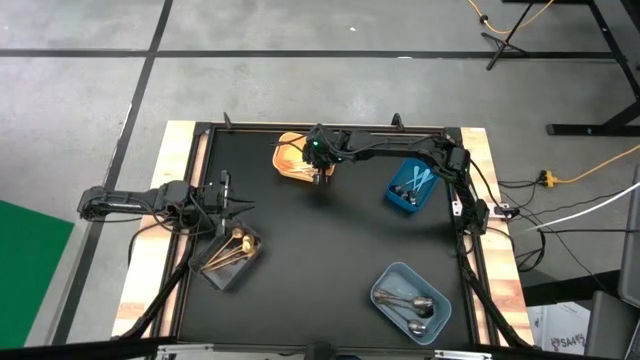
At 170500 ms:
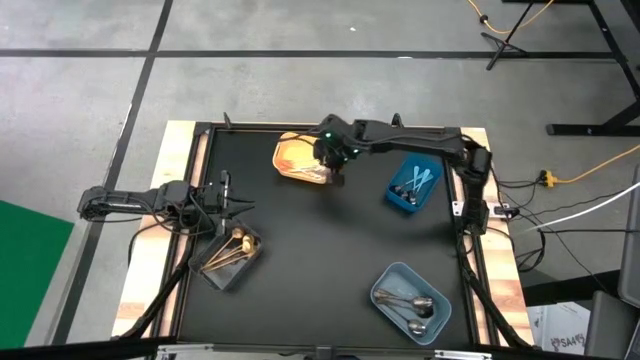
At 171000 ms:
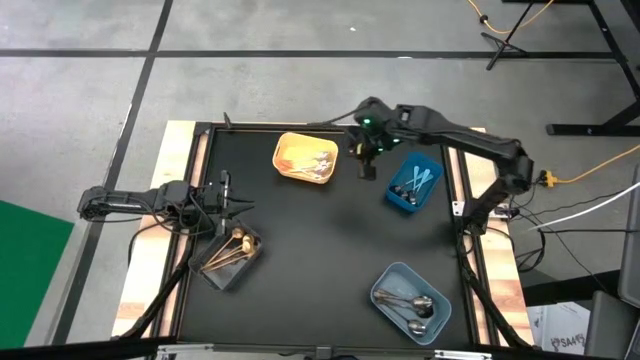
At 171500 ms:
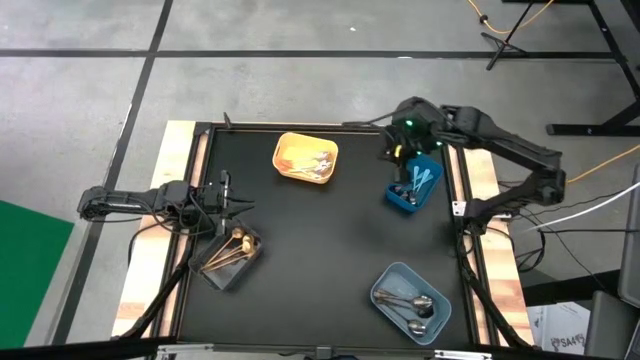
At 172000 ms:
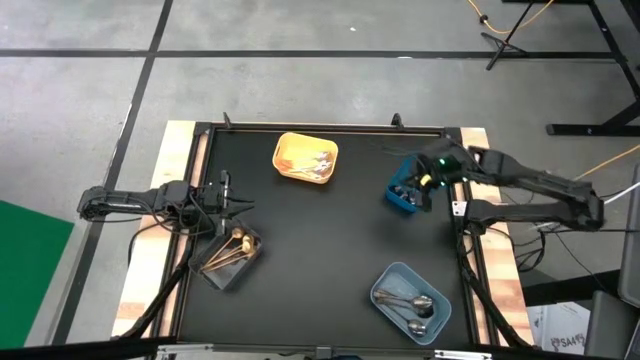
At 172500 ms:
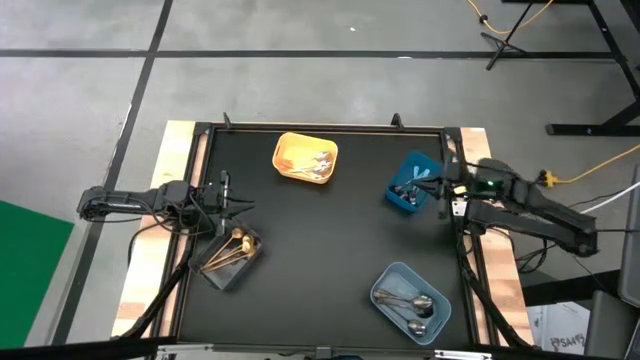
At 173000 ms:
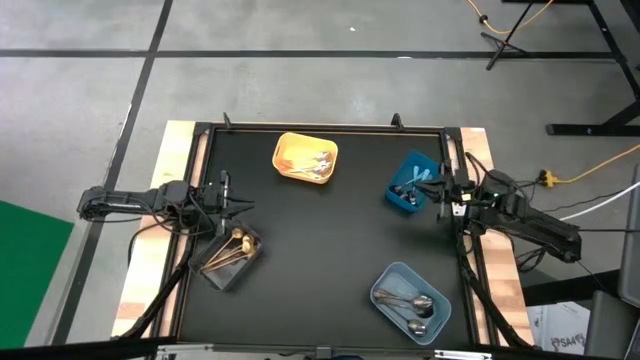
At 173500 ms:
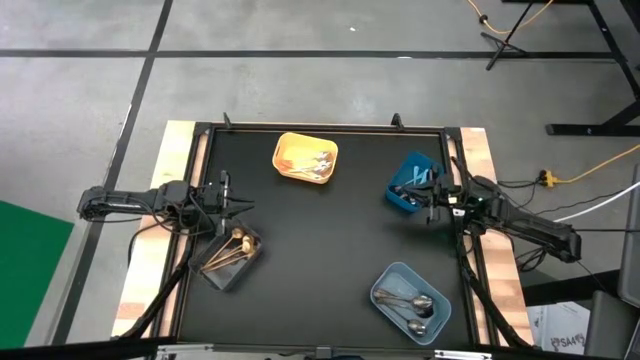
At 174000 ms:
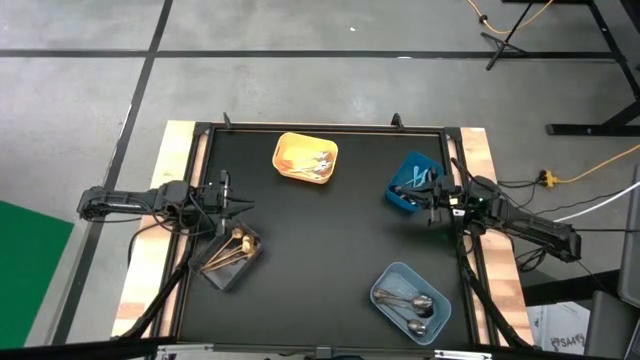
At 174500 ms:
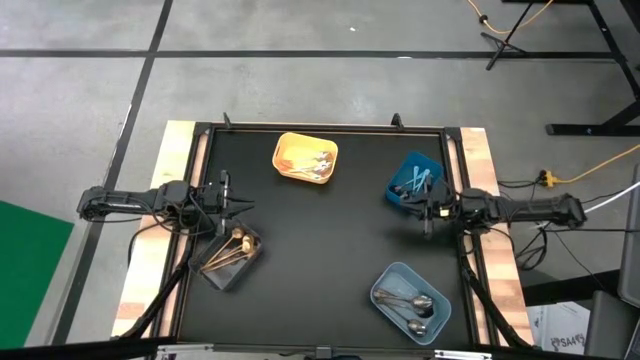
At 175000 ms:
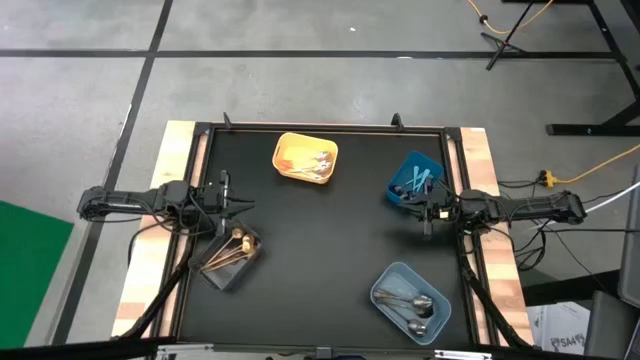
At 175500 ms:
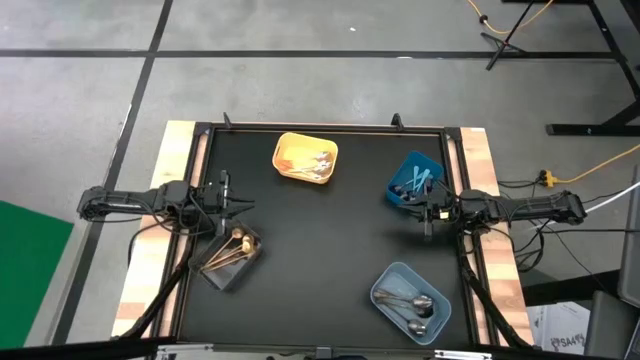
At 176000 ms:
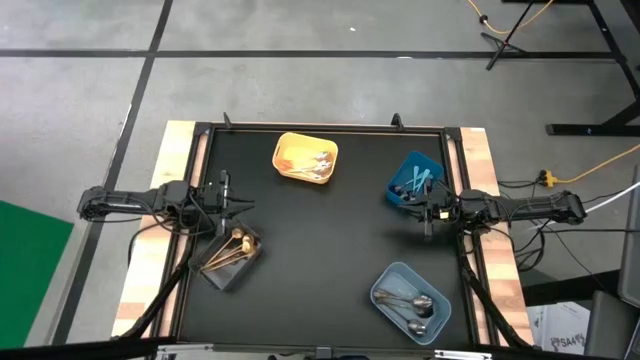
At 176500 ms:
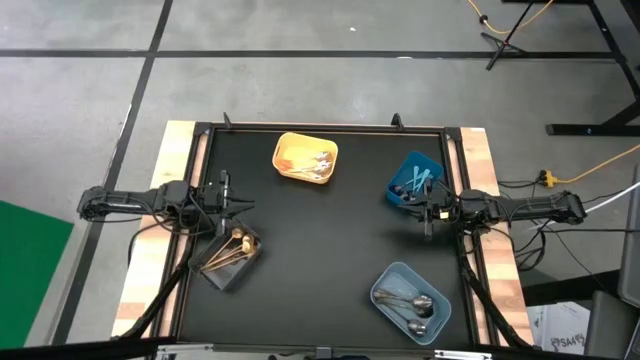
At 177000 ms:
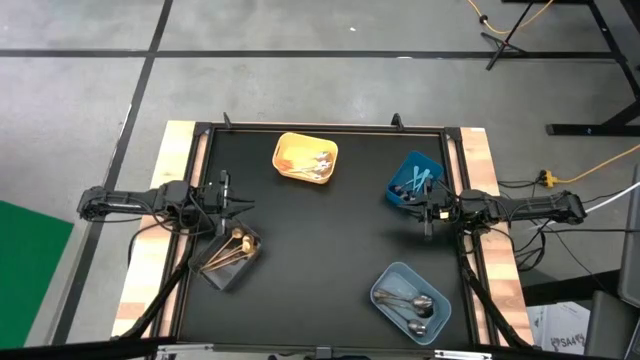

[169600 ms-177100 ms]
Task: Sort silverware by color (type)
Return to Home Position

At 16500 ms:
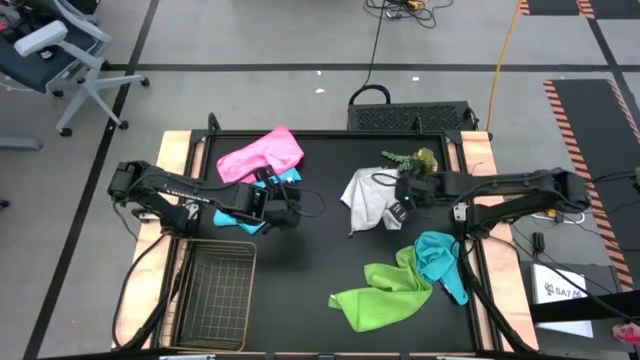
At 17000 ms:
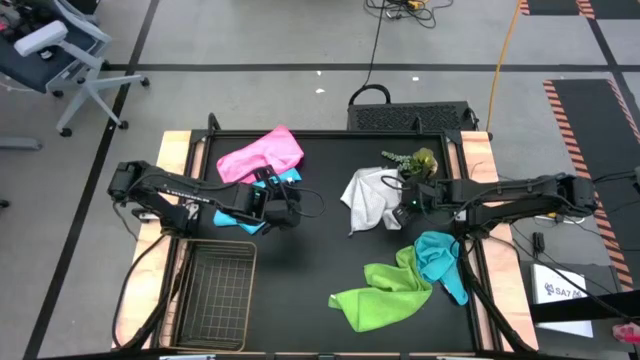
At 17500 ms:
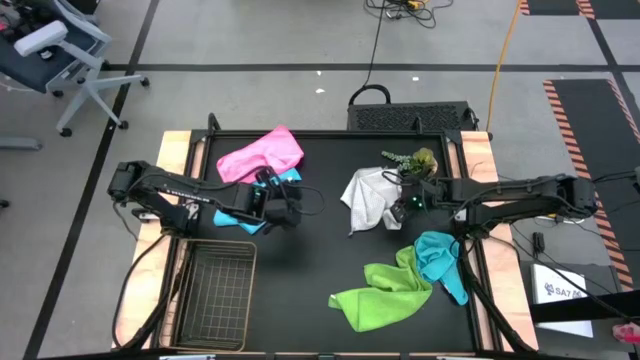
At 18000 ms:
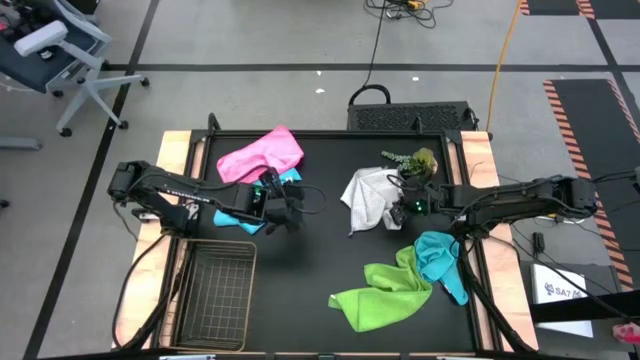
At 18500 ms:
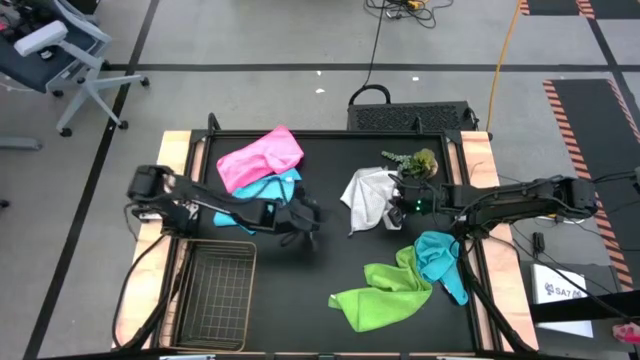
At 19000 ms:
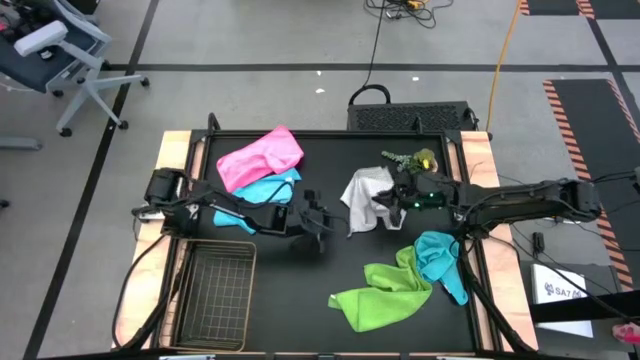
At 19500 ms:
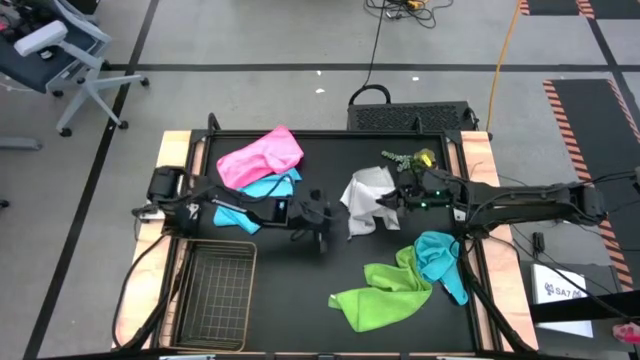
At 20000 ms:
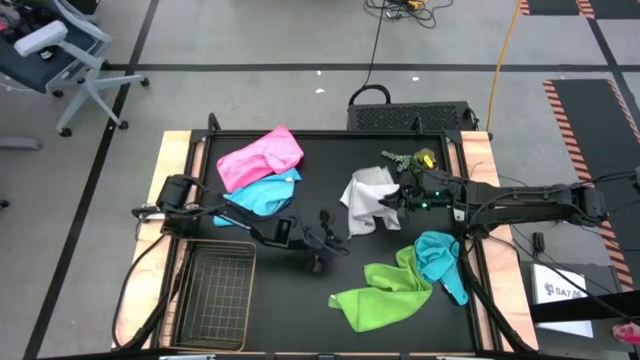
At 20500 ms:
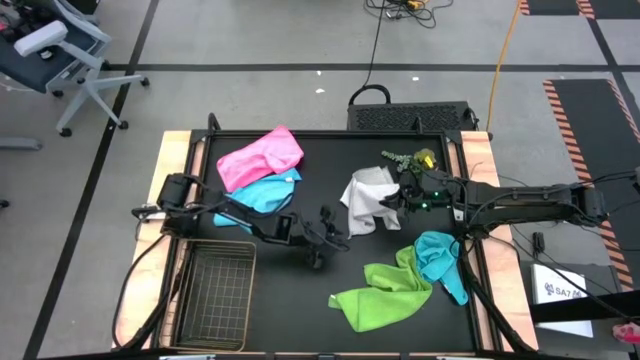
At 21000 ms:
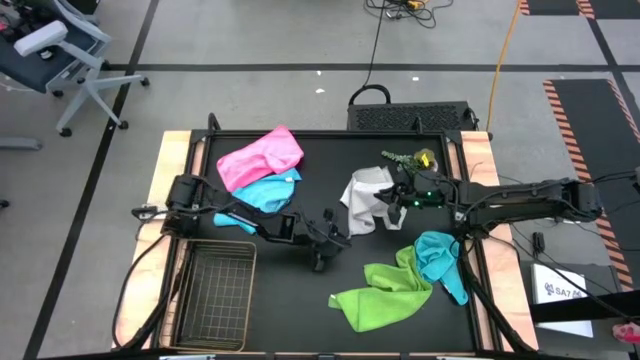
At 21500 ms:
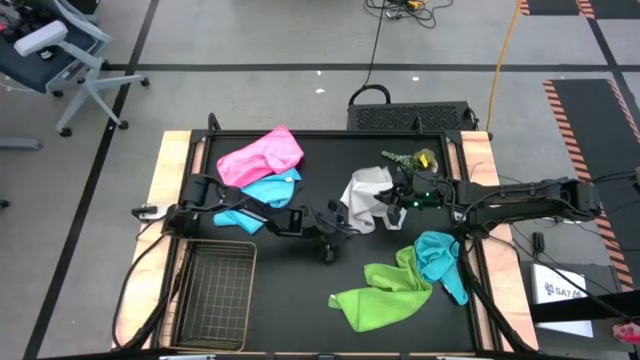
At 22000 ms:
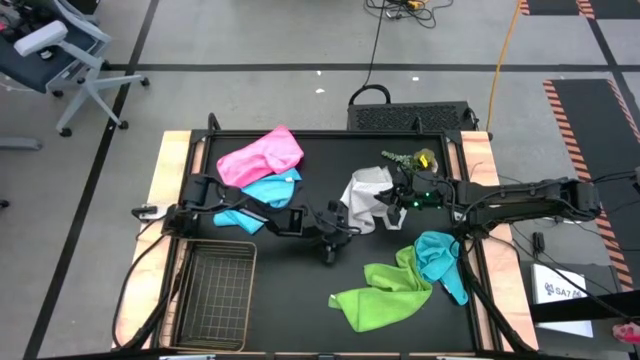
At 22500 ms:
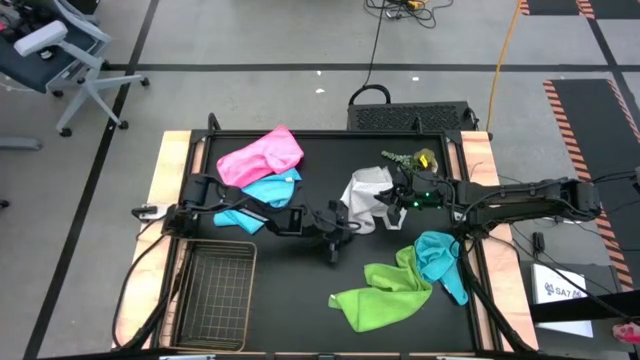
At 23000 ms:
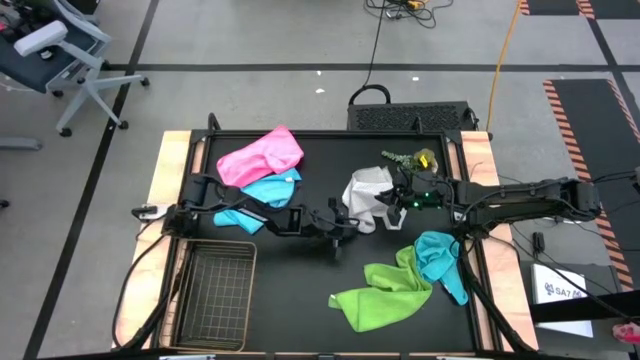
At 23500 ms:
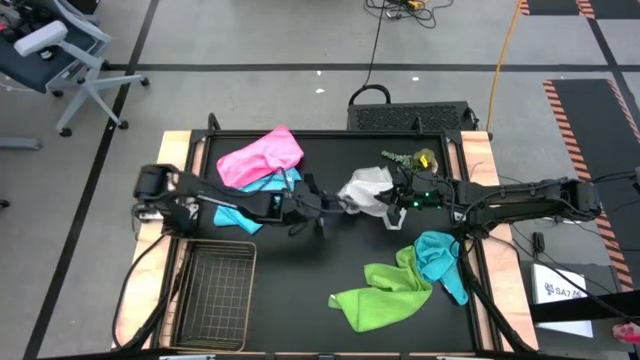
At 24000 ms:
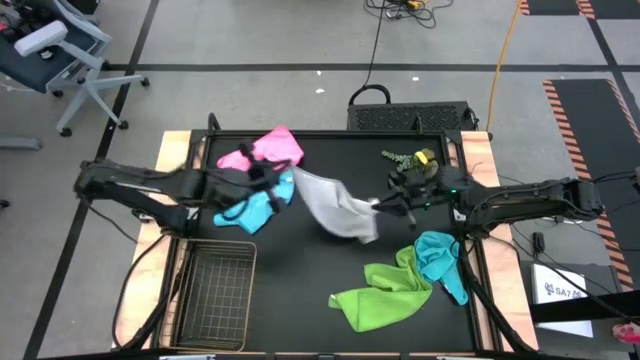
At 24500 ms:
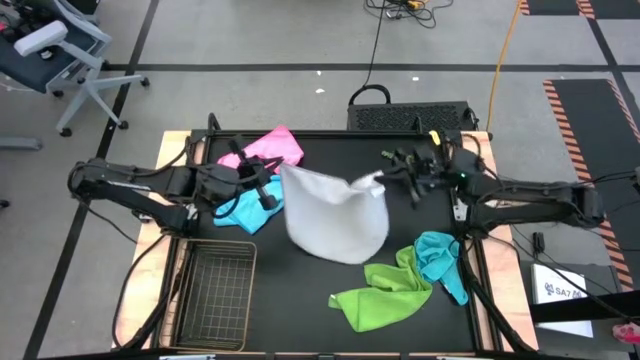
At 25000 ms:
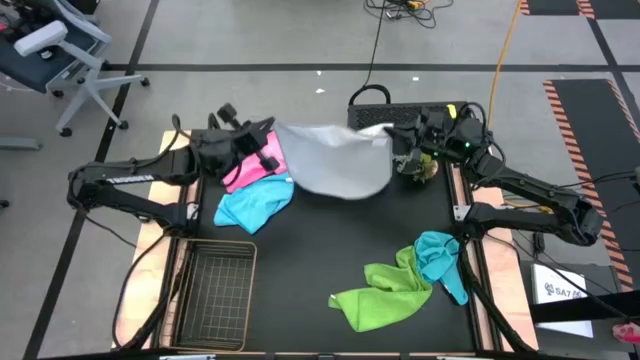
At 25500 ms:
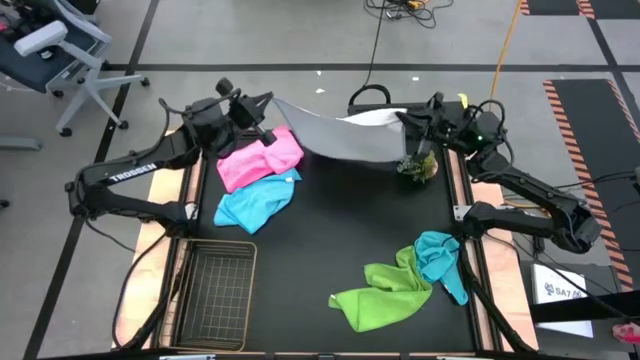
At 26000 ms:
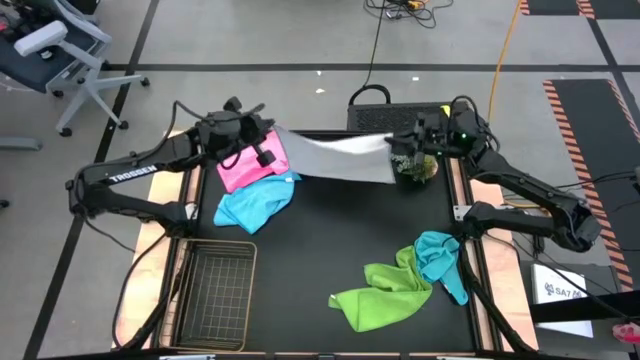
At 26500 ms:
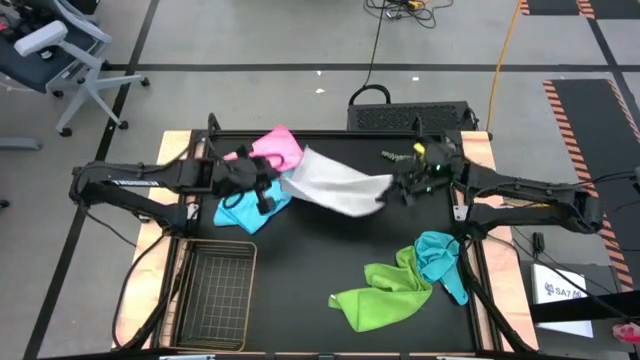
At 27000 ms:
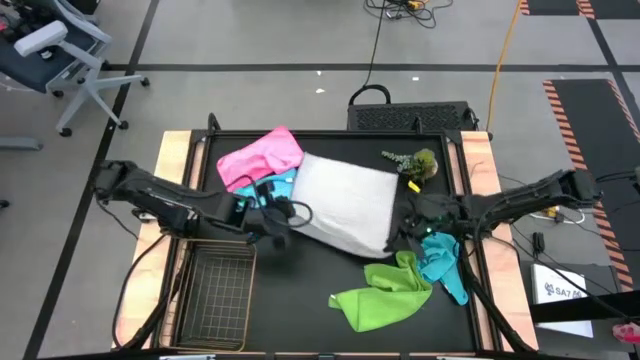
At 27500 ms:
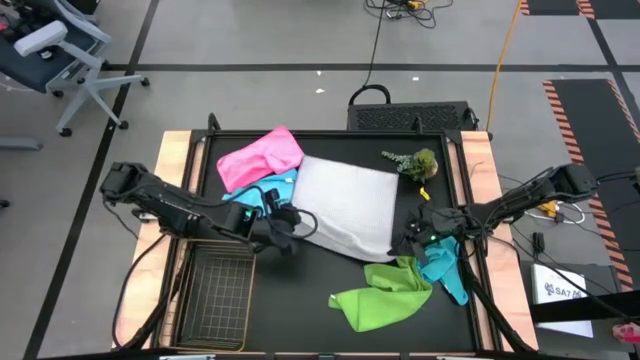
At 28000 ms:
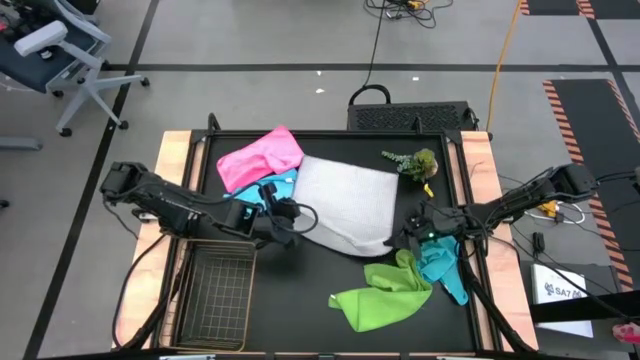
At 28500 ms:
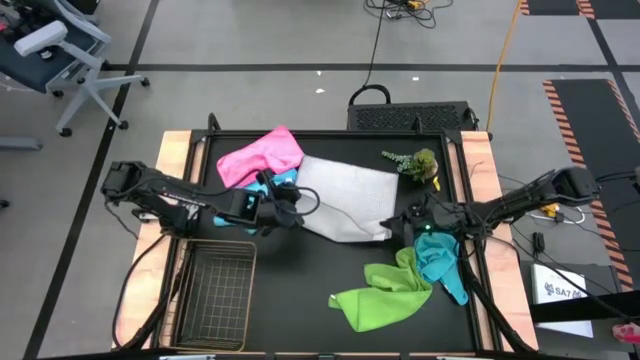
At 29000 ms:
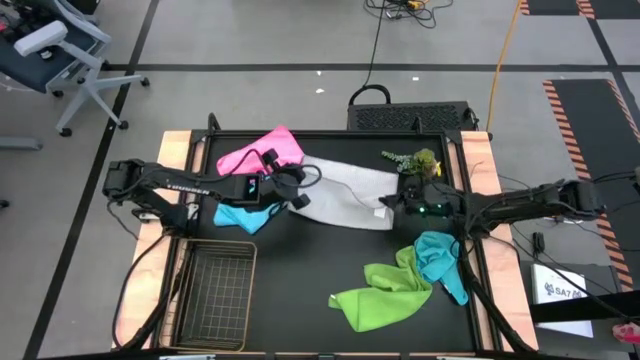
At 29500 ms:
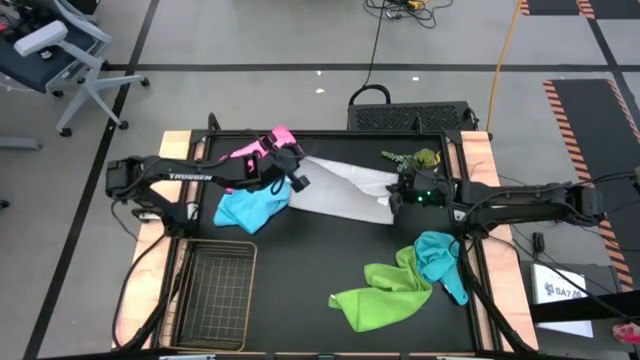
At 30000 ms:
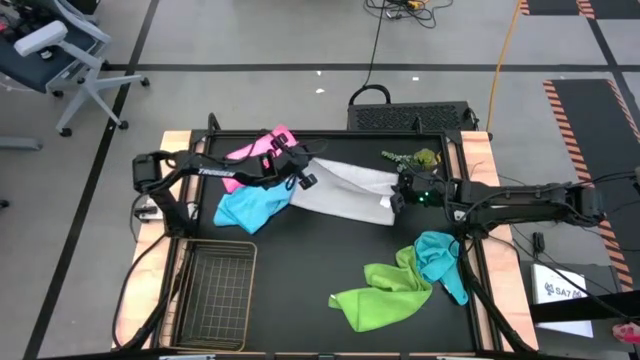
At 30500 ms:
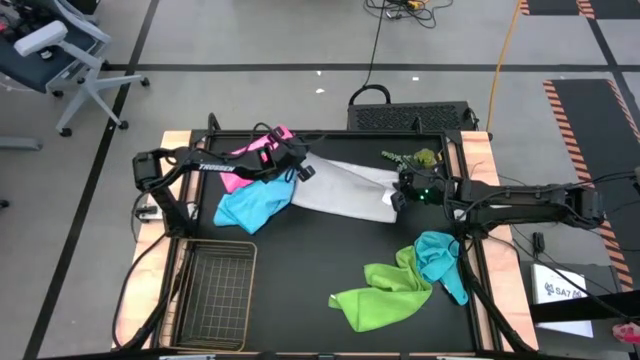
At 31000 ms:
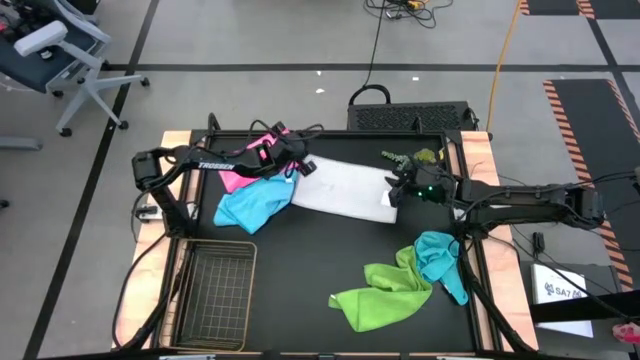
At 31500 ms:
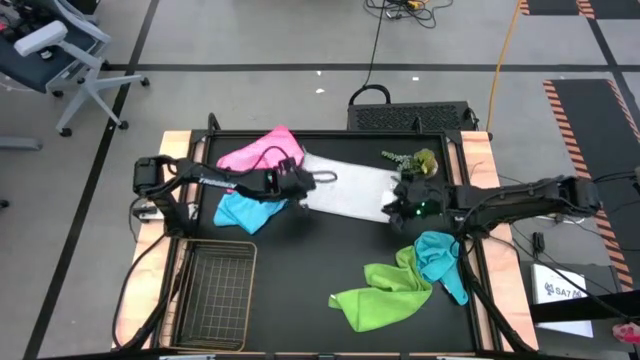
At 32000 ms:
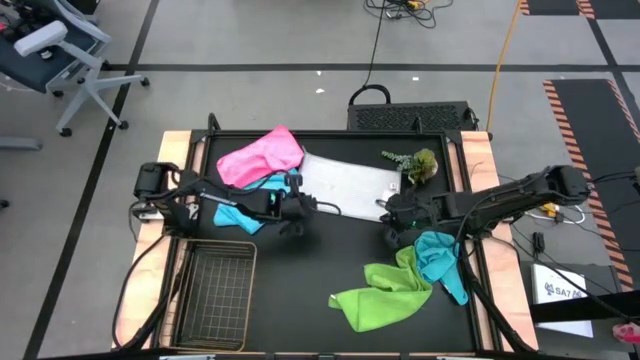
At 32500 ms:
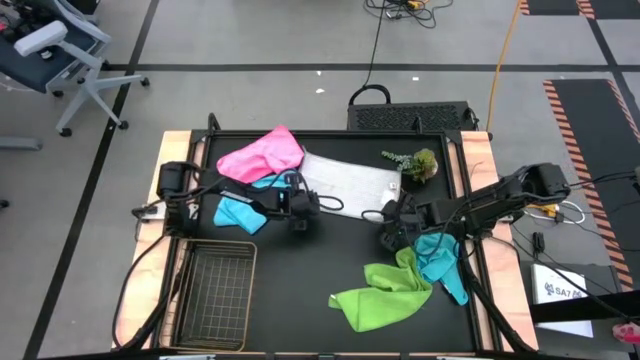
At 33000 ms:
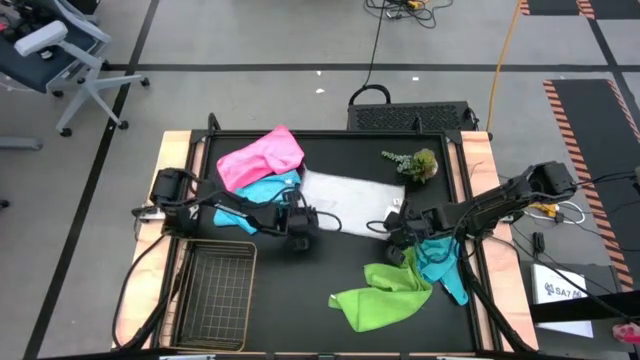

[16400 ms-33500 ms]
Task: Fold microfiber towels
Fold the gray microfiber cloth
